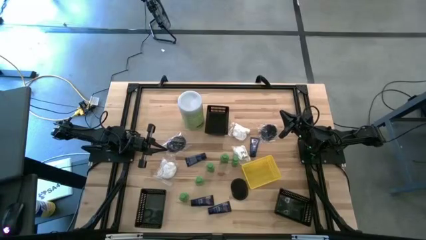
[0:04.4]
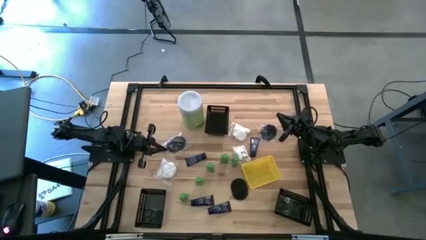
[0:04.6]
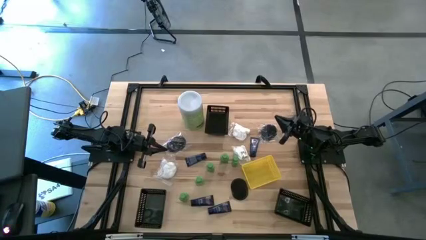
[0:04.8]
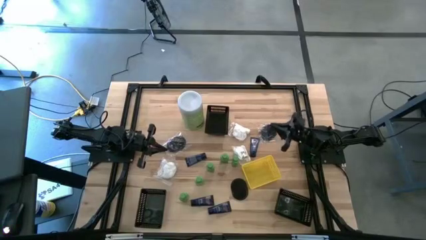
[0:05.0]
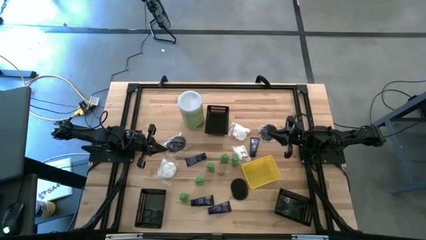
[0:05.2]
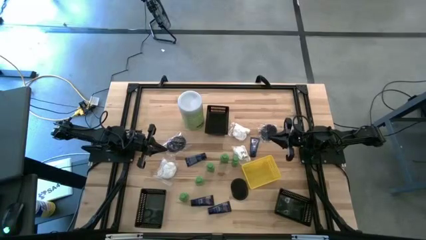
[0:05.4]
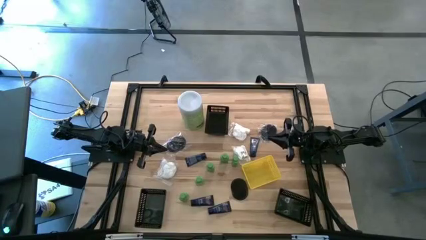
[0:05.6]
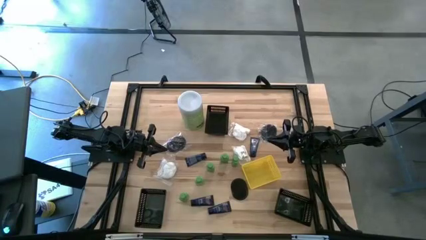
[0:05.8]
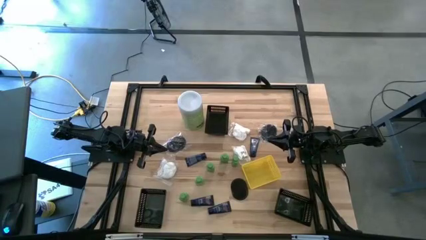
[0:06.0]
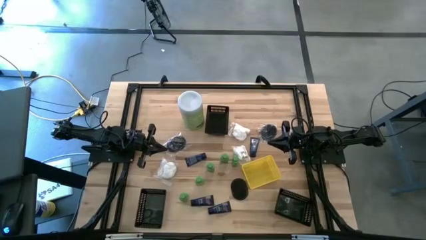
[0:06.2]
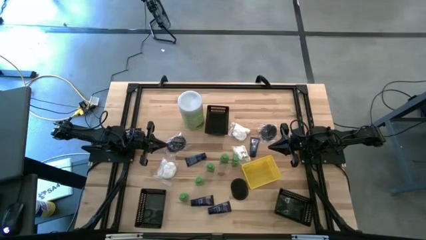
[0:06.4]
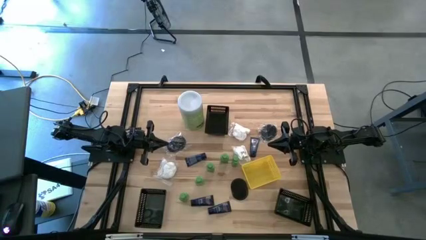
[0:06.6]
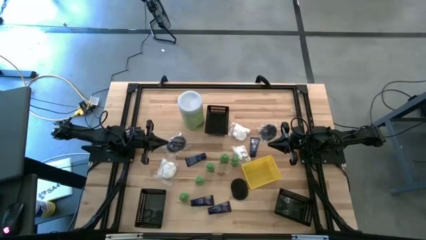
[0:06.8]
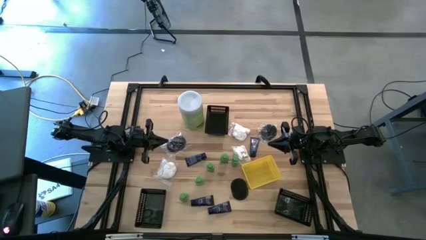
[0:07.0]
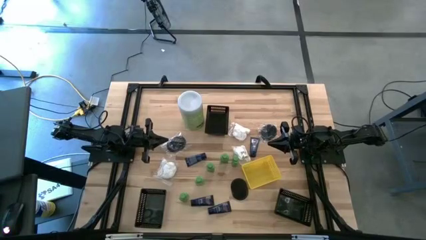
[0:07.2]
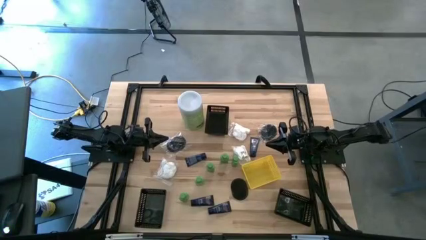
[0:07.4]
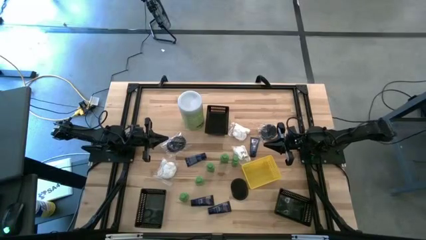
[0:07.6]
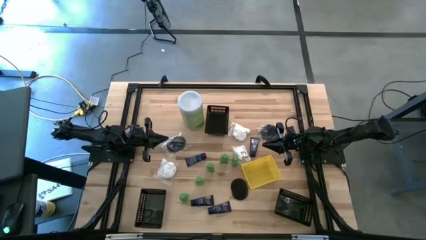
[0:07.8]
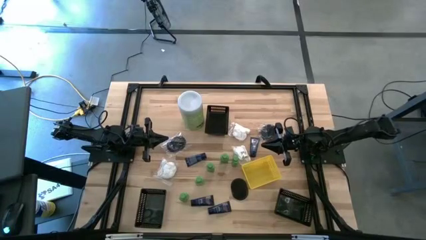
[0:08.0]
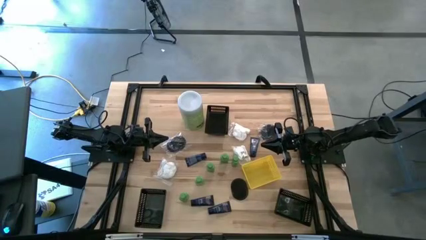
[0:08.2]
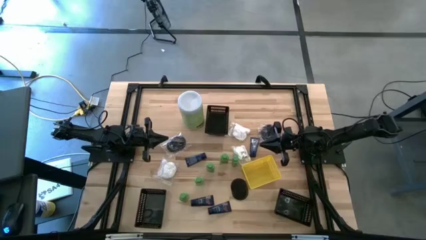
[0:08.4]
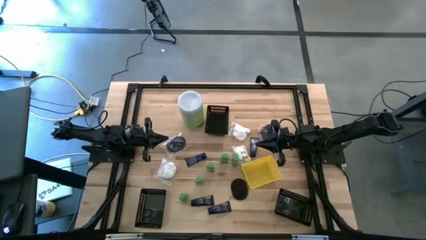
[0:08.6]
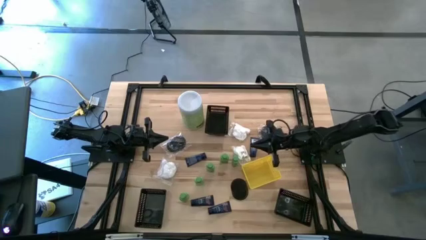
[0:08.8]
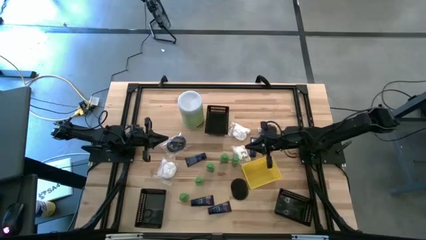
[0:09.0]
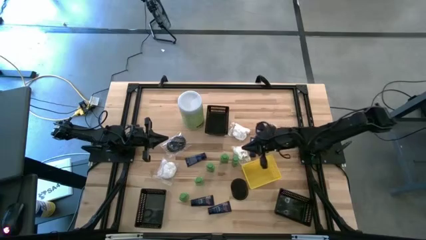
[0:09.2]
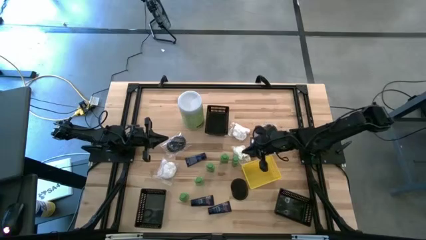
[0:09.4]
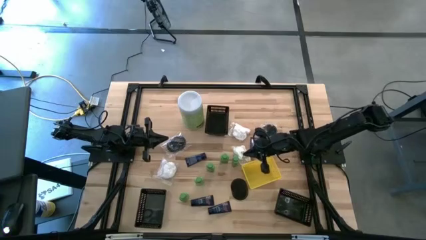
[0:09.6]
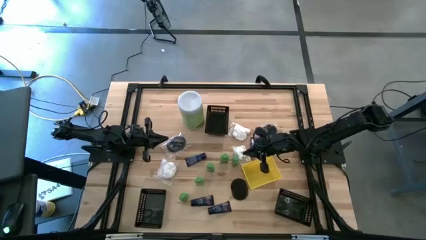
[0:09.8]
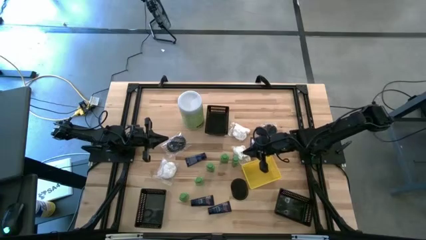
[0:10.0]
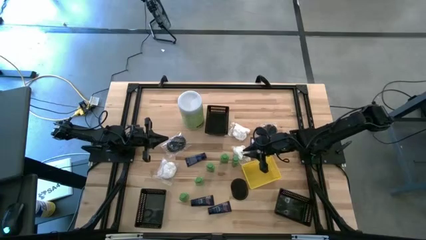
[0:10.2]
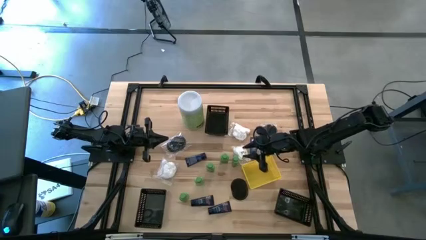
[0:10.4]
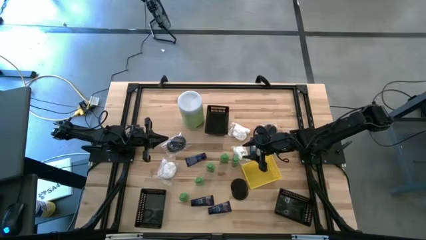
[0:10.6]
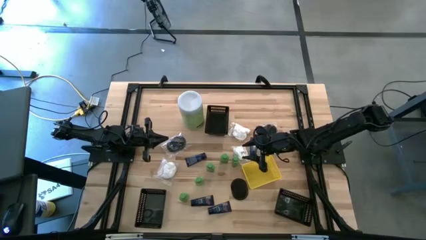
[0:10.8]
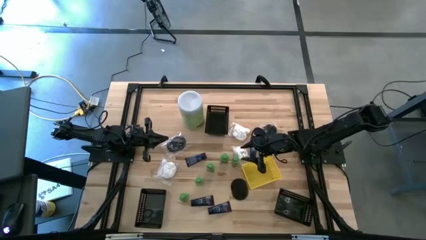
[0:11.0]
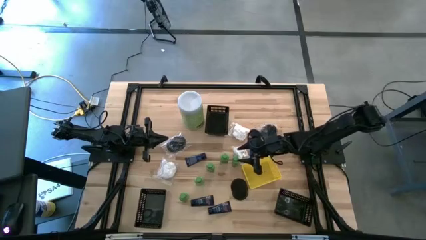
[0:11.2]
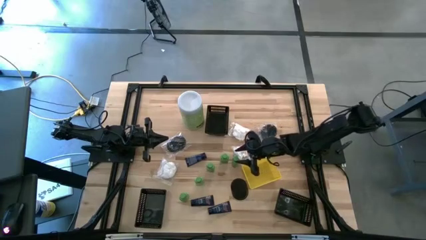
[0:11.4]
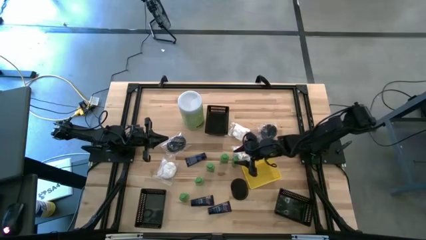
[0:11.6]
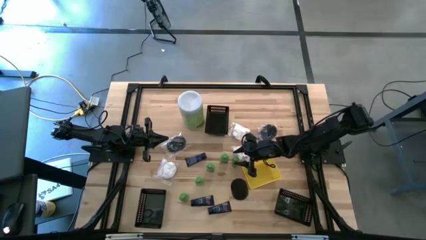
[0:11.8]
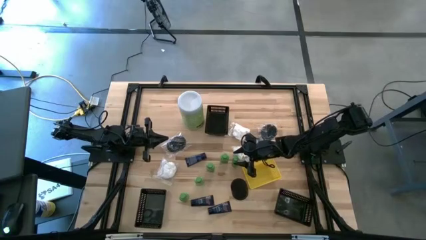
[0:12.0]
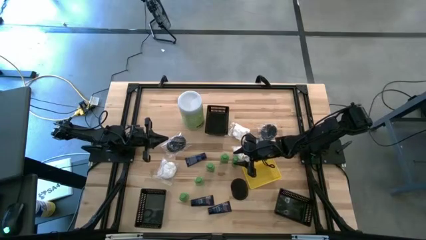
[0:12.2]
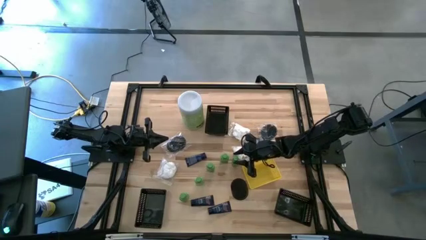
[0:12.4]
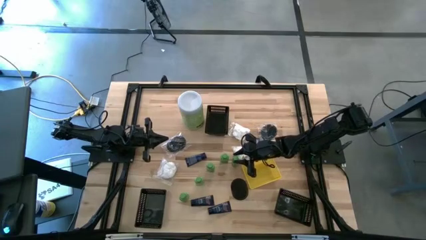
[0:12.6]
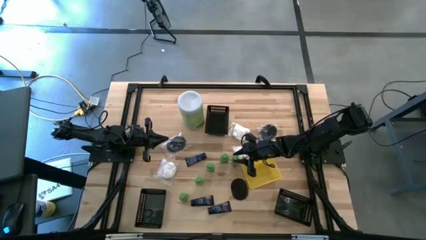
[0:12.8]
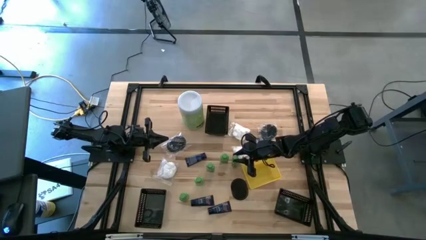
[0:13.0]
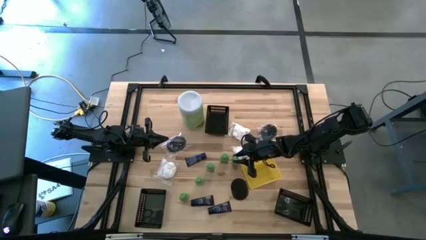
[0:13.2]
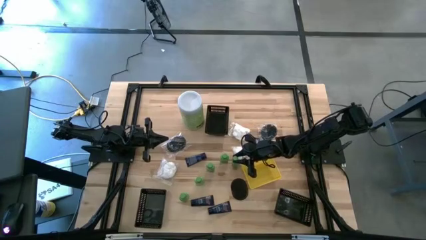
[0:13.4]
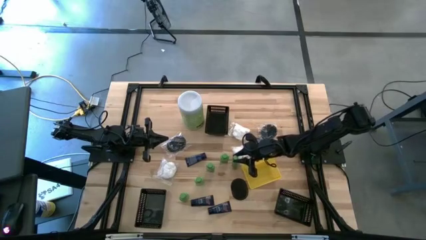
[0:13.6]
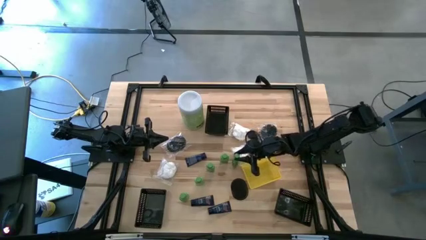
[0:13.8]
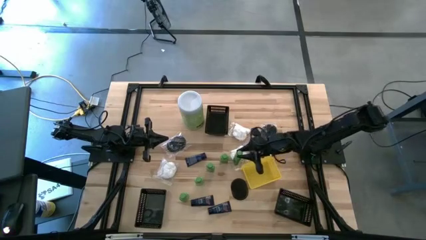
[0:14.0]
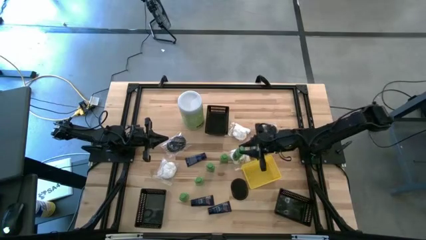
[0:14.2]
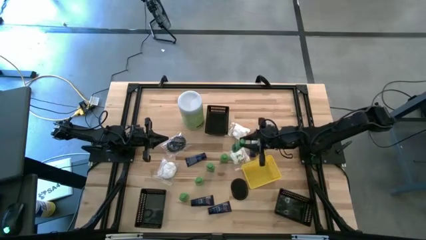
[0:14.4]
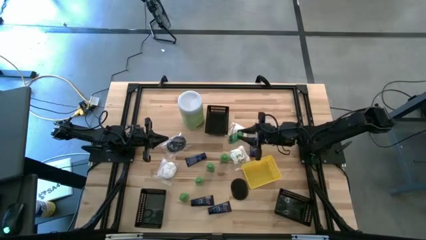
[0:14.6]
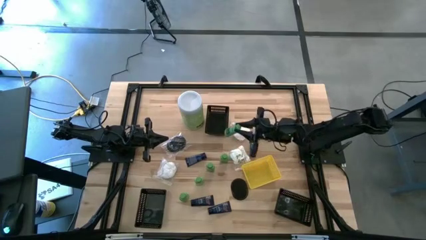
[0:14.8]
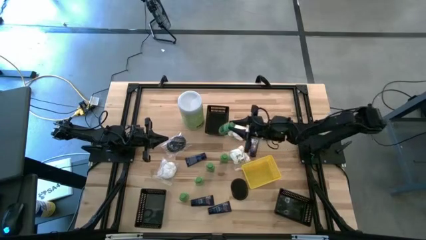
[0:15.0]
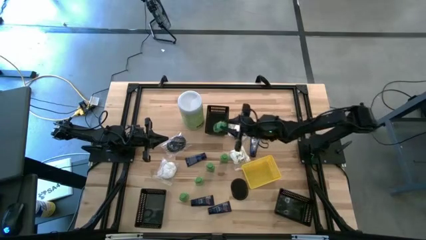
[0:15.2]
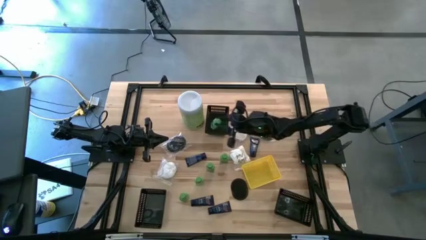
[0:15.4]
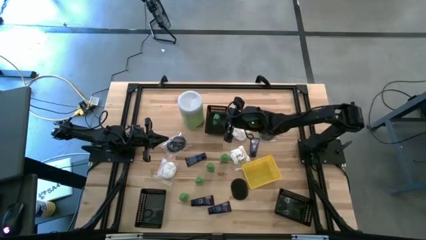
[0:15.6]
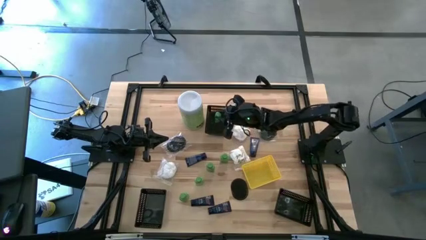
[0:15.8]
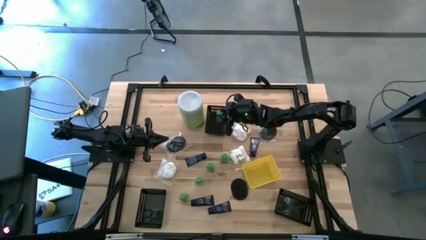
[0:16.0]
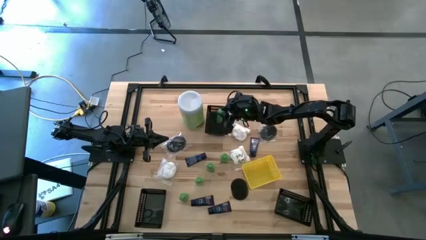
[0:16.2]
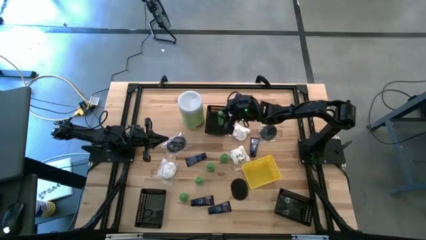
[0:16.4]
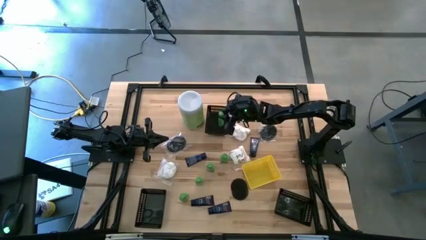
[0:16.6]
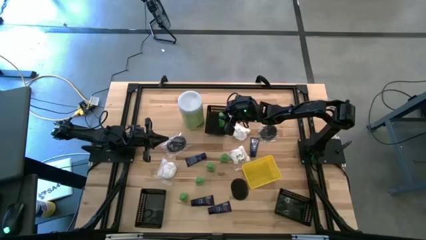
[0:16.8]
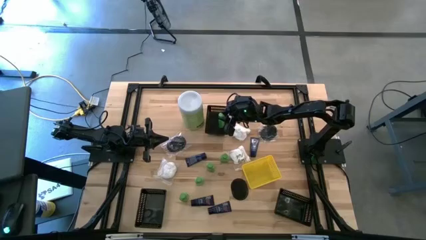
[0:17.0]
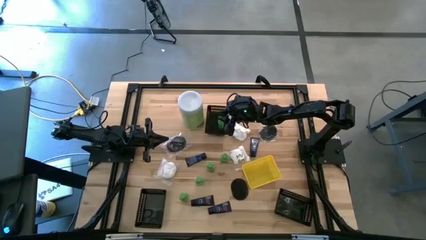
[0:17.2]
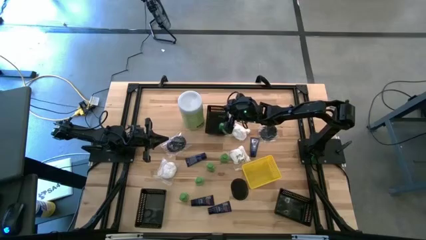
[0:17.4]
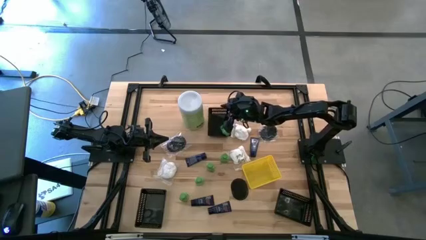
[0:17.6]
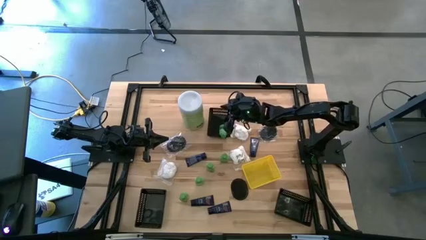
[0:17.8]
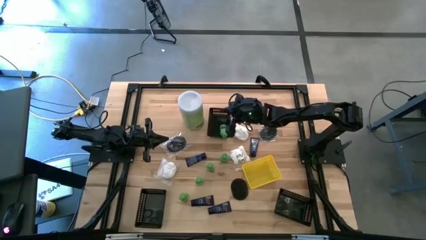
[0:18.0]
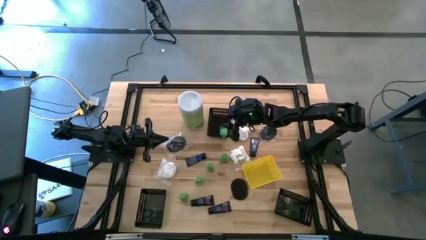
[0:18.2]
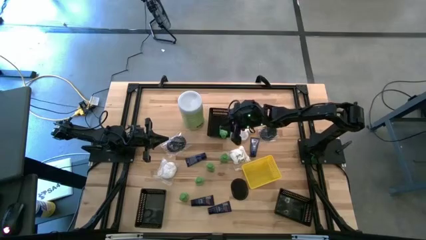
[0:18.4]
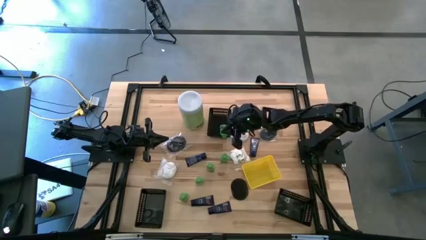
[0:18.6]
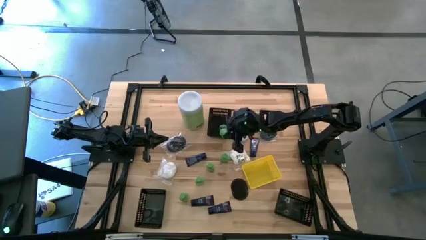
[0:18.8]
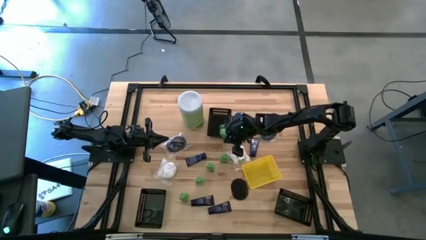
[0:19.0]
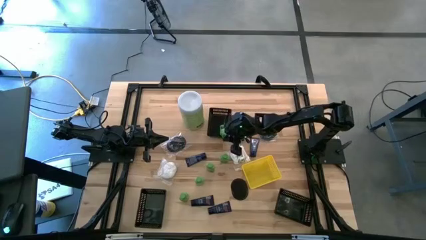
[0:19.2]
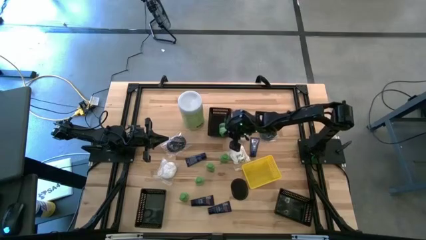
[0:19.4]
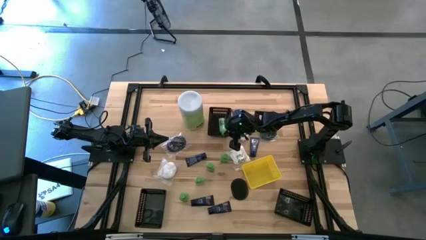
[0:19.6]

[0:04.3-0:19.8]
Task: Pick & Place Travel size toiletries
Put the green shampoo bottle into the top black bin
